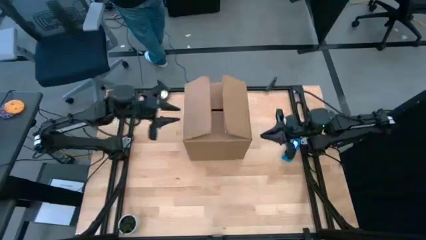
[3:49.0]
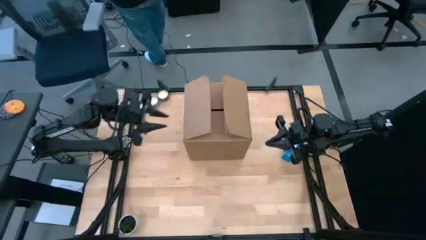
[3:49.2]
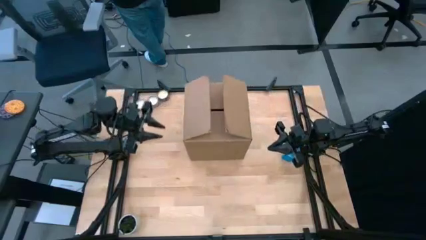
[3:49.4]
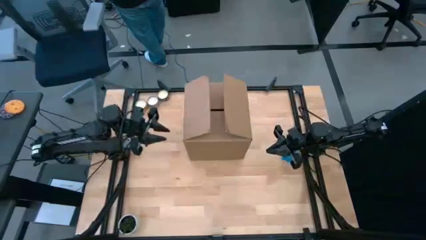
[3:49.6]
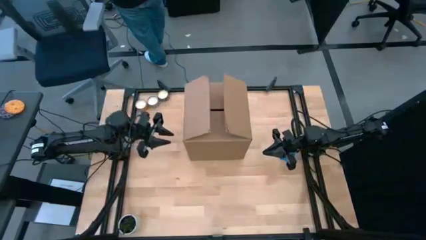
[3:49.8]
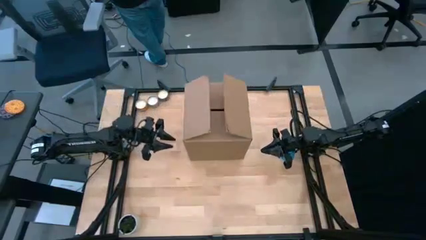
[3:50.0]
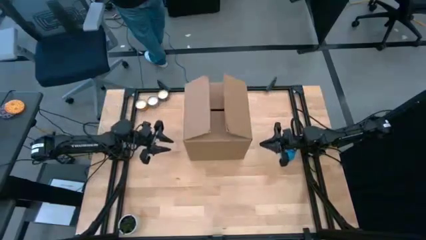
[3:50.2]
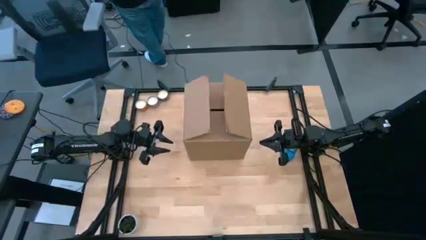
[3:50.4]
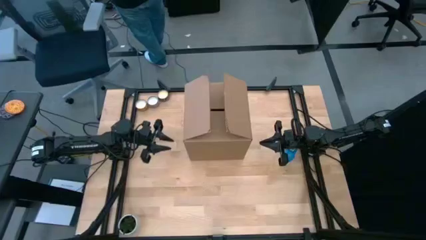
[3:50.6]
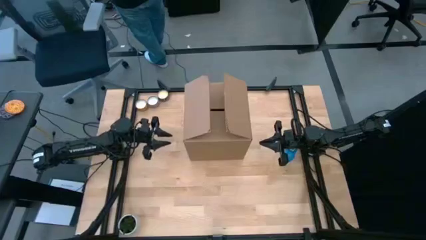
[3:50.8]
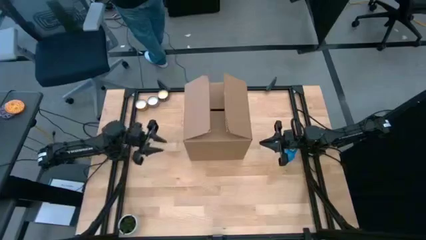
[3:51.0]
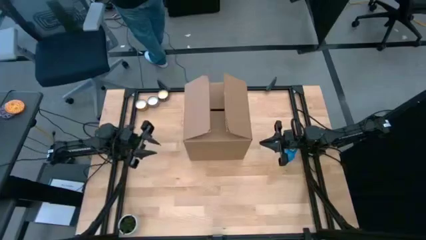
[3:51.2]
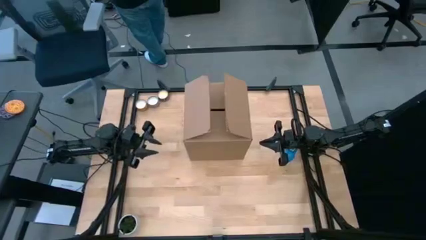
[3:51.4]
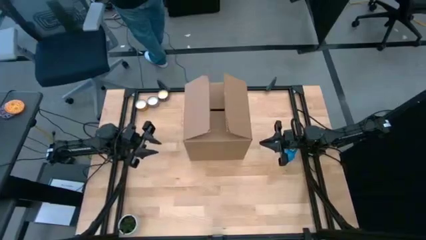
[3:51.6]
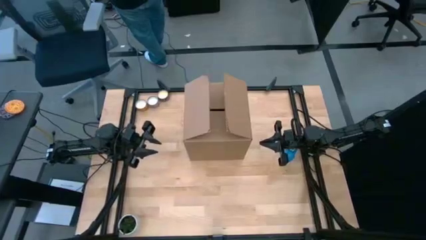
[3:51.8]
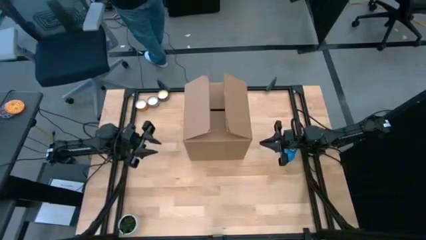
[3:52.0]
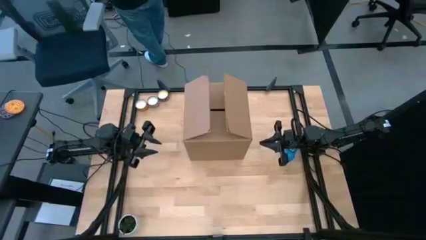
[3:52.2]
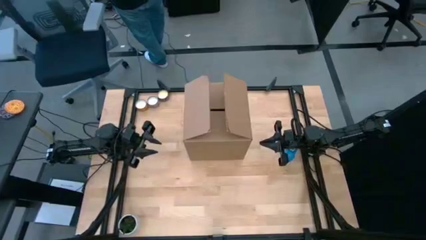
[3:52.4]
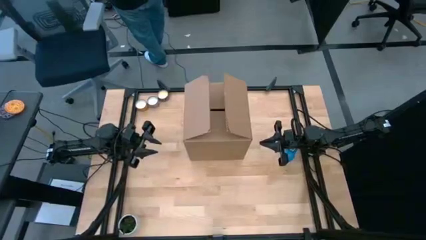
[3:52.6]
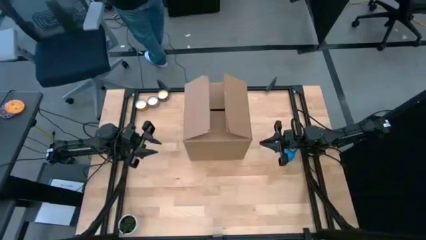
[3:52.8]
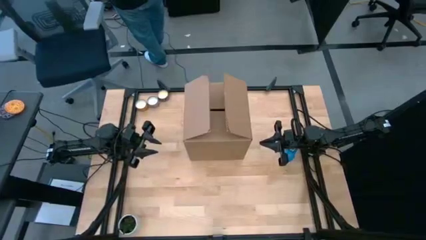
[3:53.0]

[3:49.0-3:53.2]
Task: wrap mug
Return to Home Position

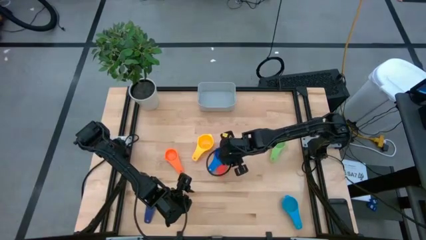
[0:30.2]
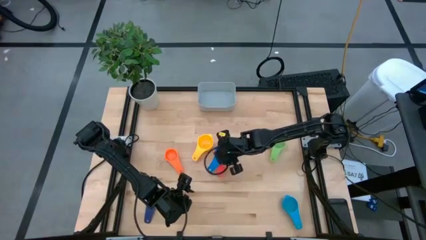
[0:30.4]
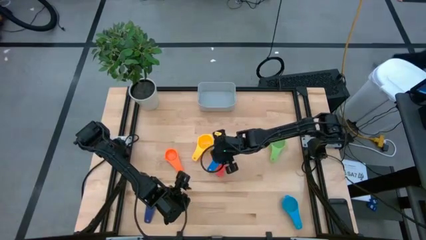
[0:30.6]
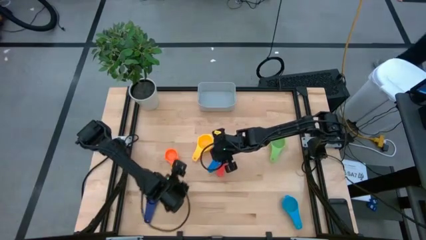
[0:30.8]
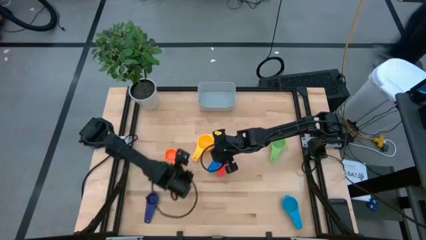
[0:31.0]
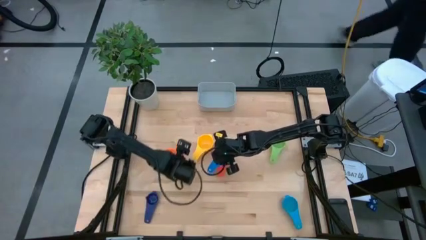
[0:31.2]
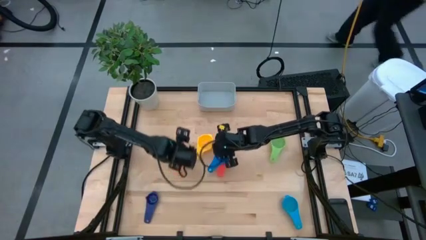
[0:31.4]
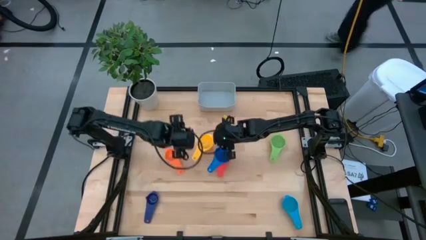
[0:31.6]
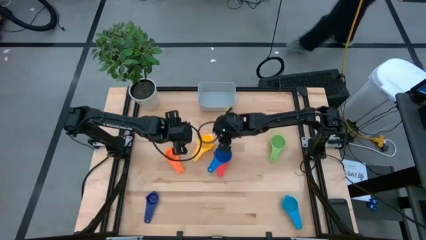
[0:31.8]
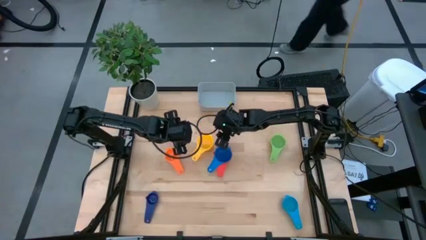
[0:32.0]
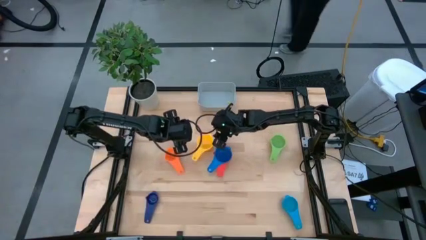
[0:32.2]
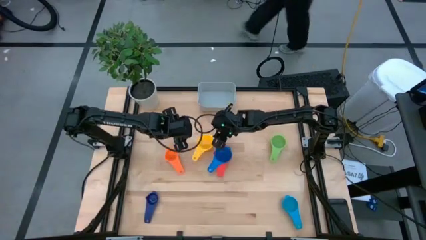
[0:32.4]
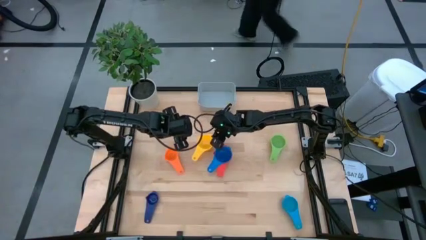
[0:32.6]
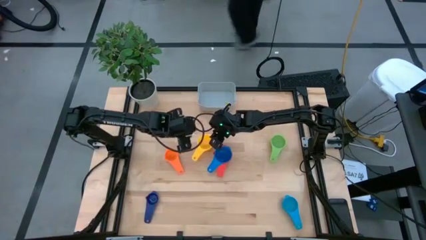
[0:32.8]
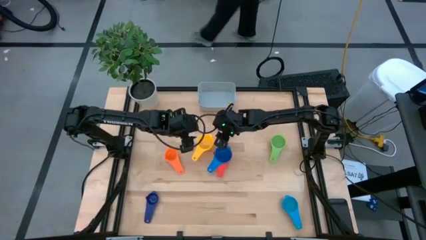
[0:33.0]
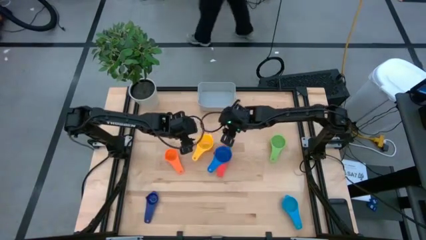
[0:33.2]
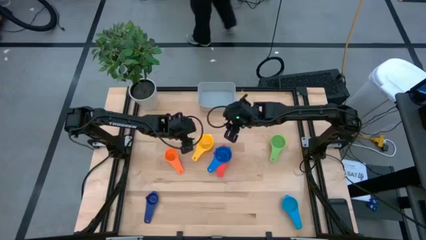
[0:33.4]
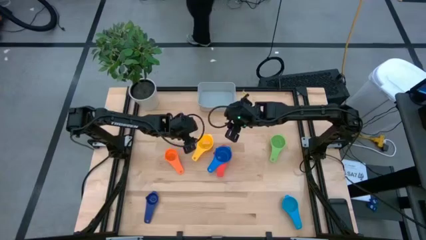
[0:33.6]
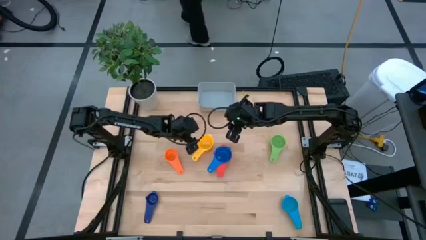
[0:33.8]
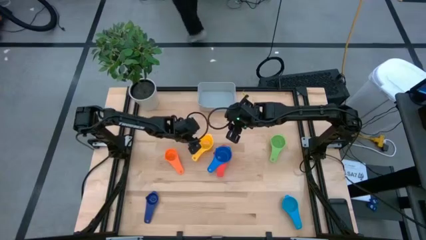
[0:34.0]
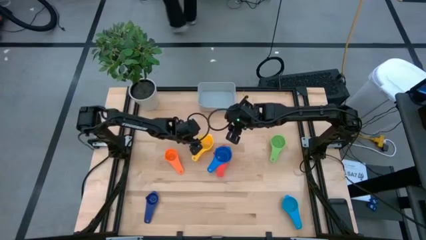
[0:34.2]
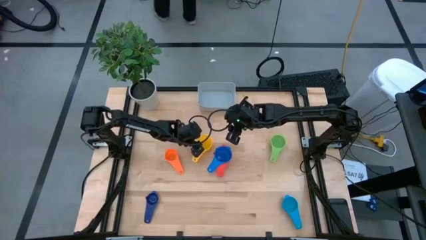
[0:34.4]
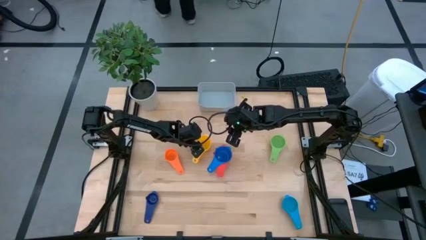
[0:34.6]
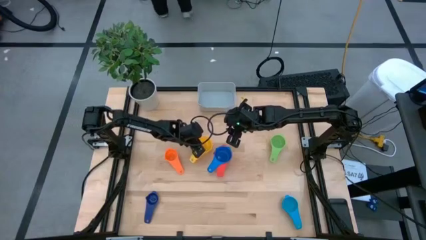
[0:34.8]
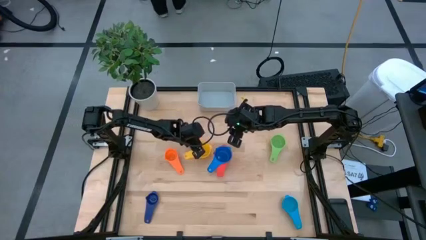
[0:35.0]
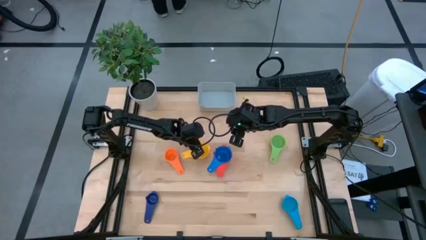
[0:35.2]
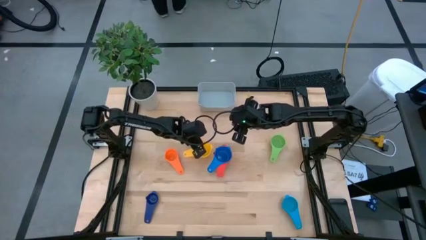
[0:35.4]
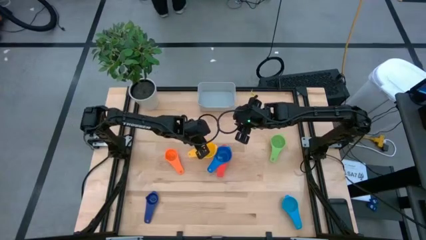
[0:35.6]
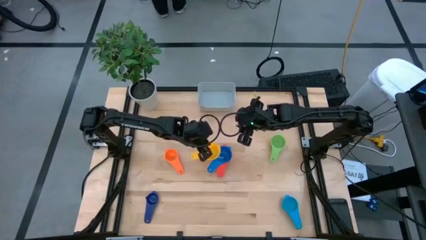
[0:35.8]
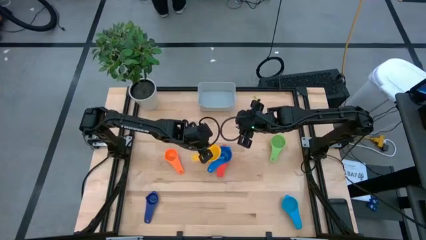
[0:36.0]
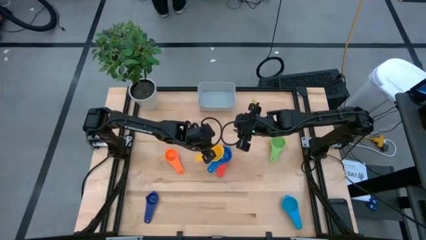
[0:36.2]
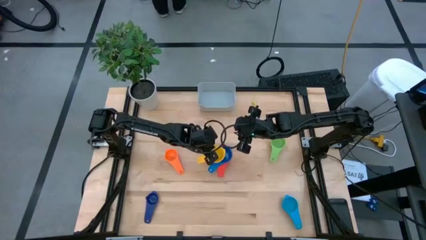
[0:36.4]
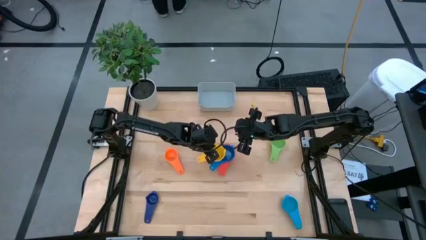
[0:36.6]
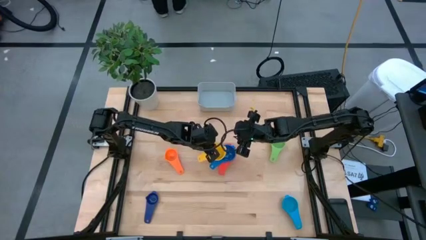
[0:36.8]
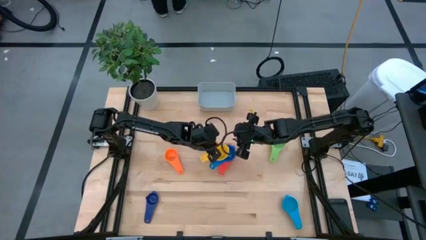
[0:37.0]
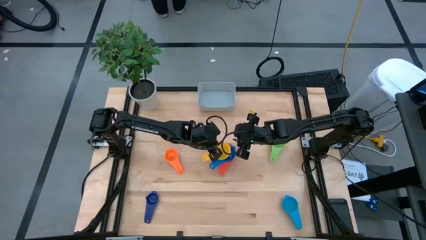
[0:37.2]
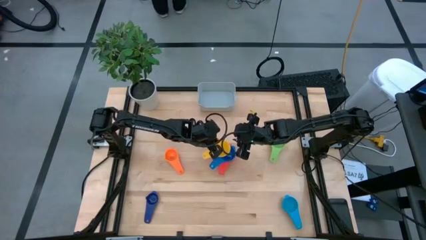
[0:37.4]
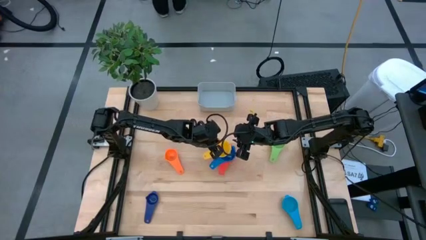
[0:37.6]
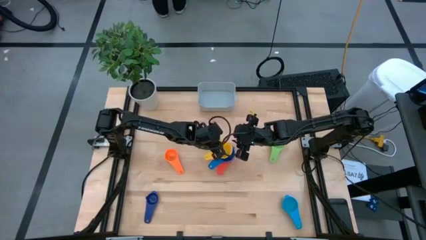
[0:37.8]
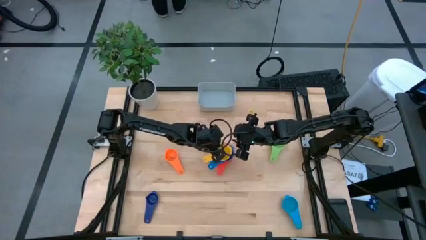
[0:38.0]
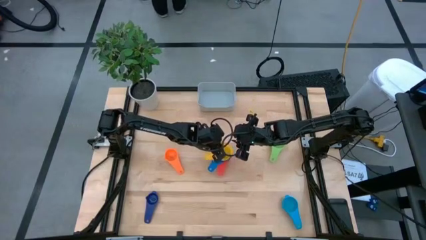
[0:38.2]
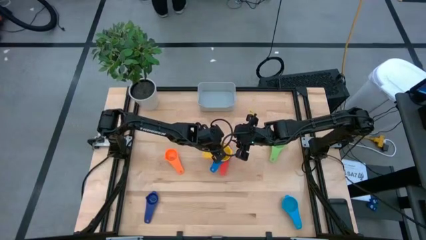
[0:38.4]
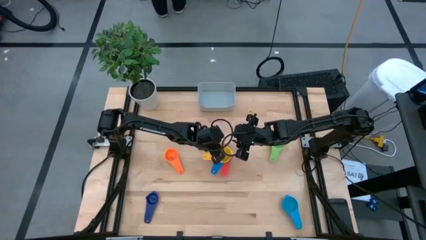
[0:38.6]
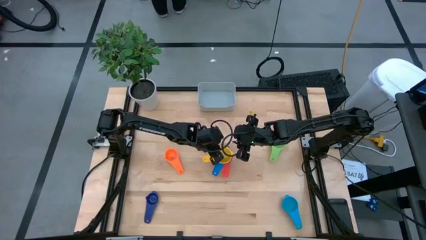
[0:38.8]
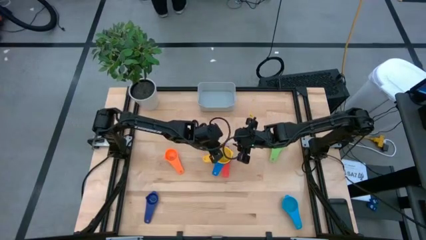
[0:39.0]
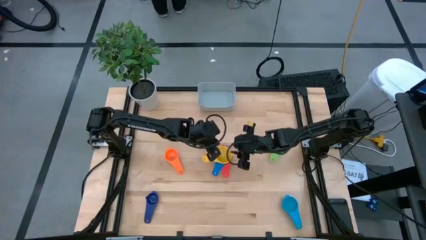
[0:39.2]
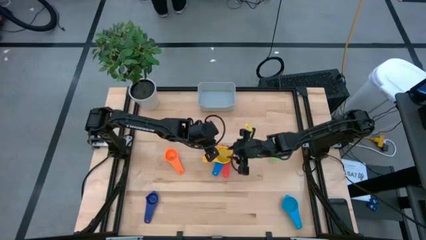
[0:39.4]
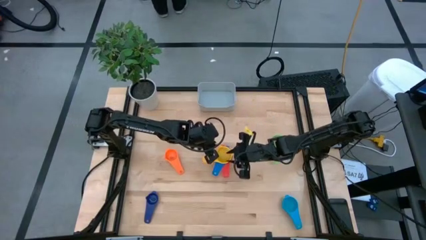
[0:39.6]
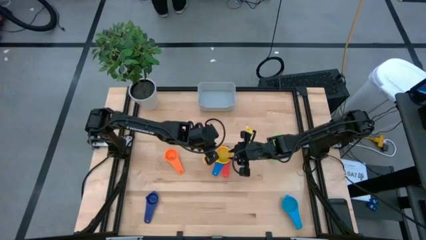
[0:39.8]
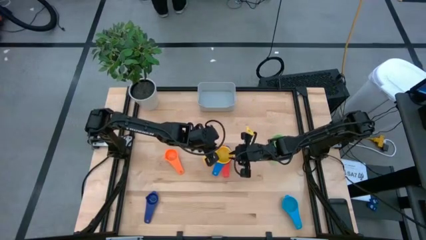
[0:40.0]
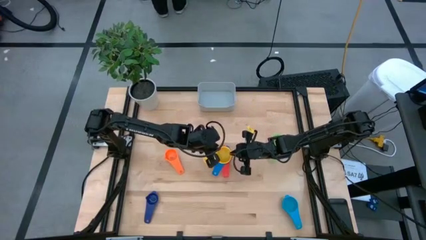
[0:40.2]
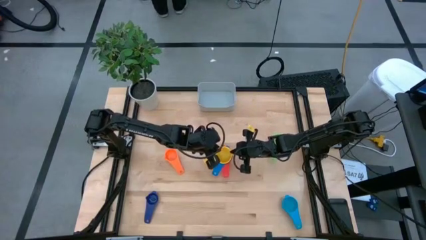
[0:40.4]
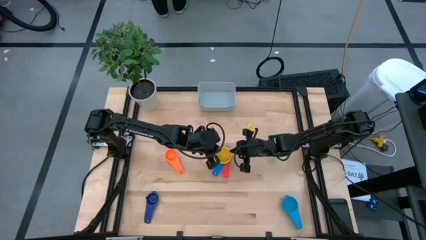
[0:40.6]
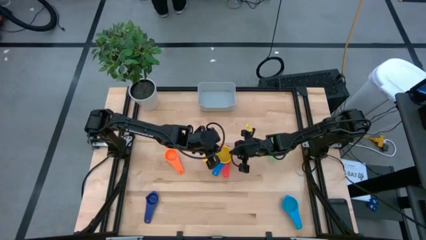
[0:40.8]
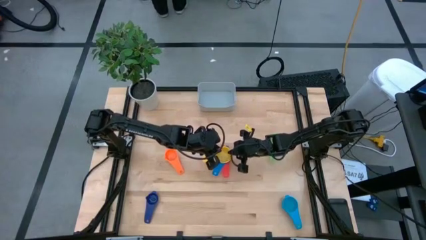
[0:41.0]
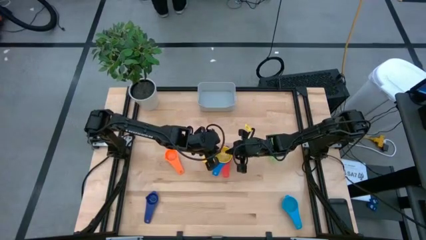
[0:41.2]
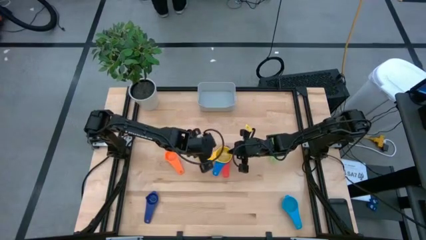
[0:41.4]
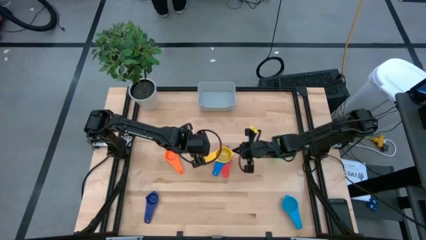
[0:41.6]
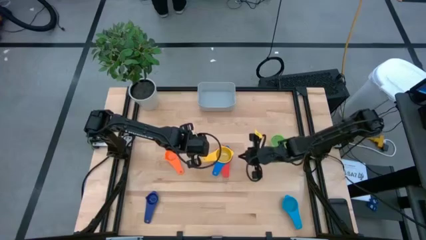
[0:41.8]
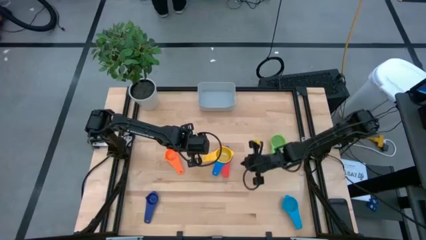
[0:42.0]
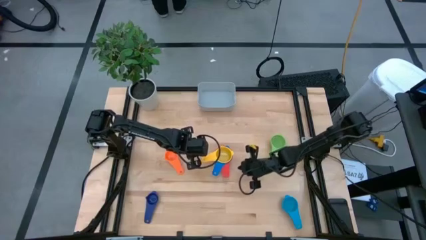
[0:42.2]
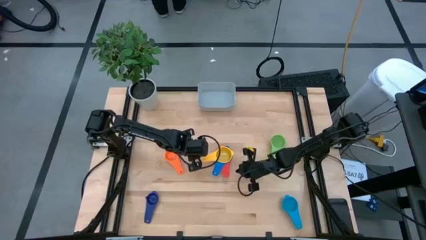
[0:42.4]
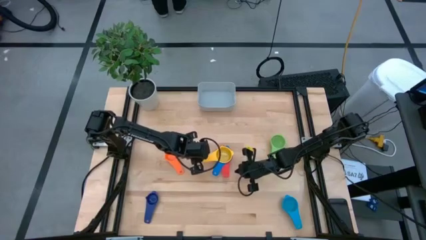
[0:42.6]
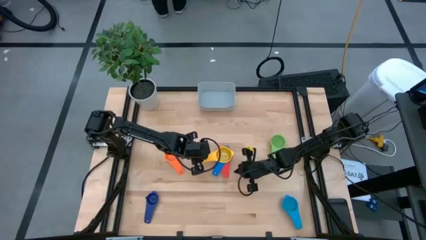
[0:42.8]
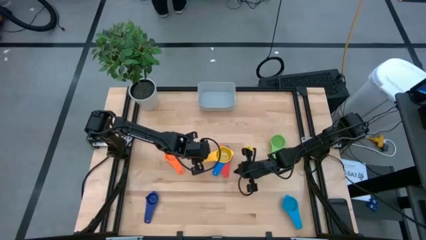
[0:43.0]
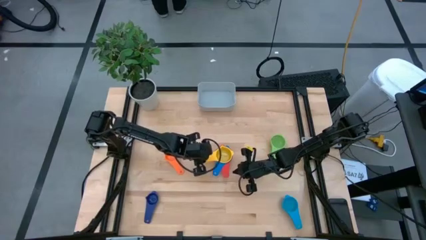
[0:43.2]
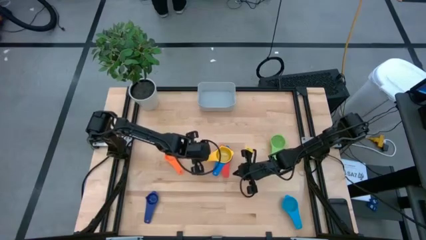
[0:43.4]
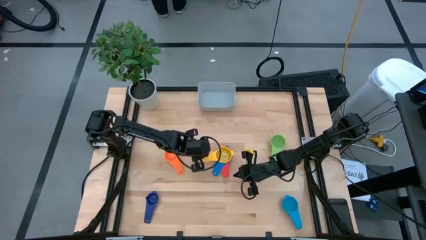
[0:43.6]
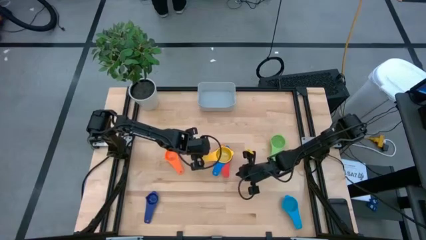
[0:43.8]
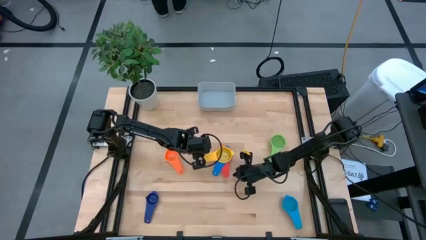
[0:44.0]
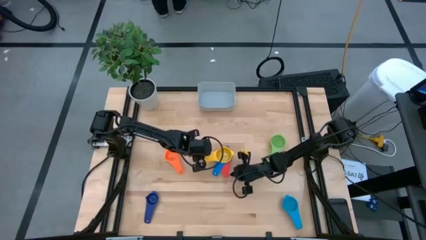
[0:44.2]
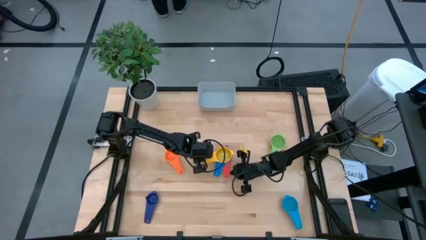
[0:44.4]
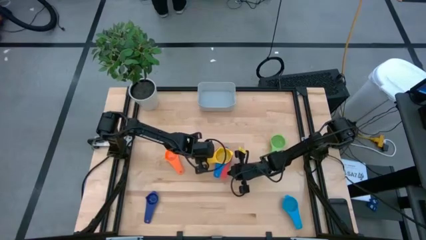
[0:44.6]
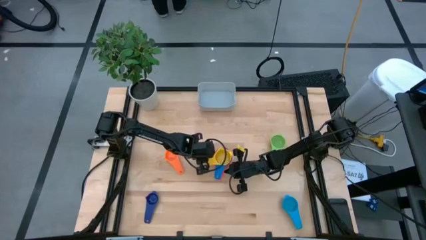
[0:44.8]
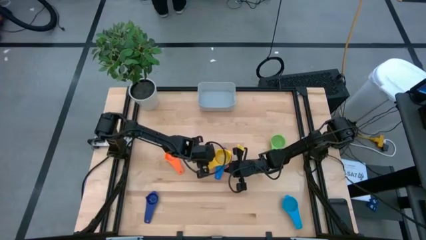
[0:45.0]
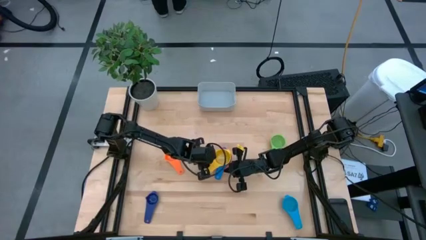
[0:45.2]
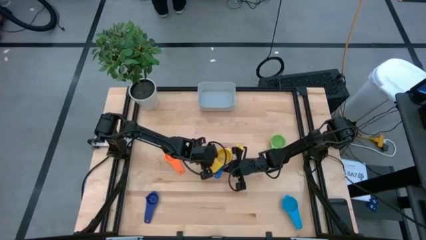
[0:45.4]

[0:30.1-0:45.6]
Task: Nest measuring cups in basket
Stack the yellow measuring cup on top of the blue measuring cup
